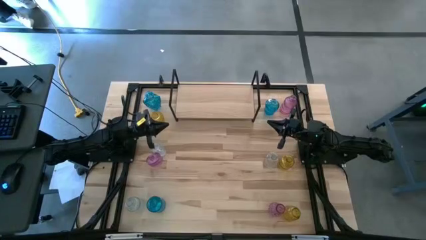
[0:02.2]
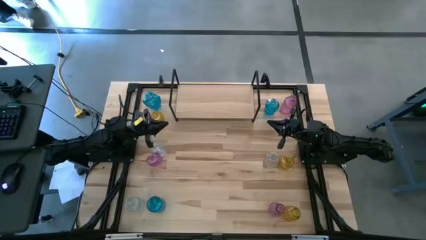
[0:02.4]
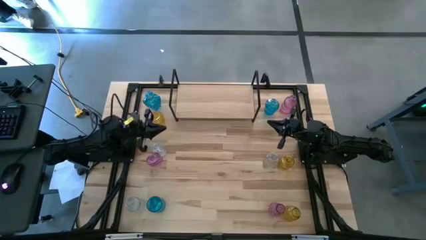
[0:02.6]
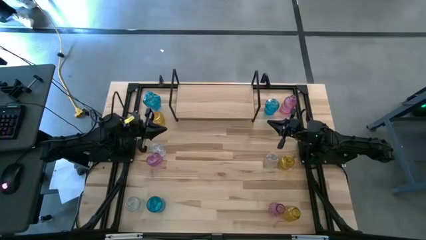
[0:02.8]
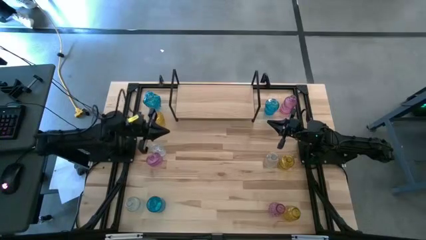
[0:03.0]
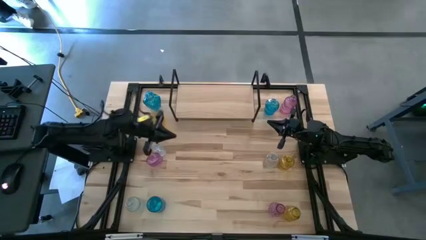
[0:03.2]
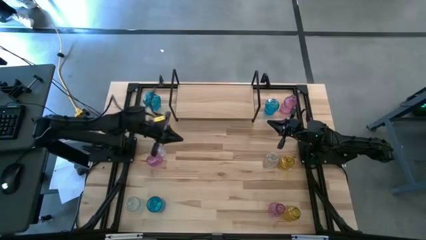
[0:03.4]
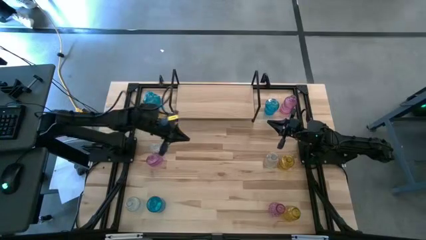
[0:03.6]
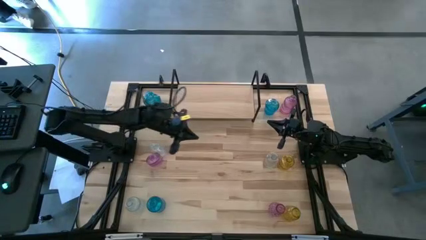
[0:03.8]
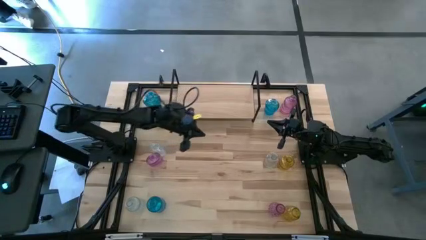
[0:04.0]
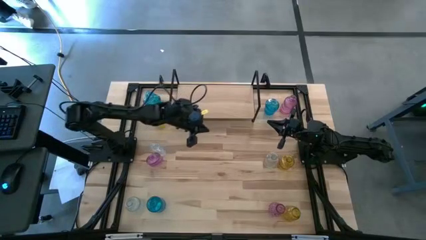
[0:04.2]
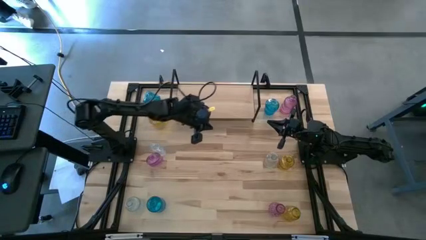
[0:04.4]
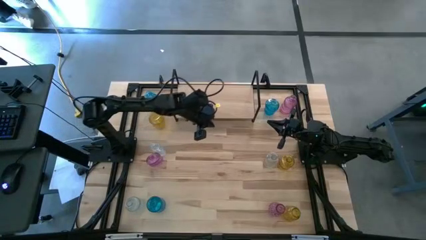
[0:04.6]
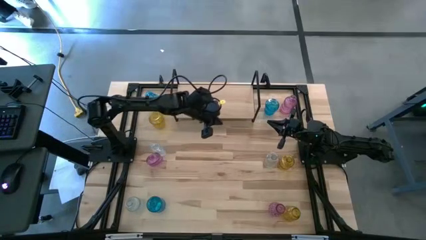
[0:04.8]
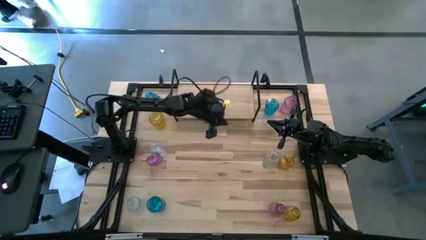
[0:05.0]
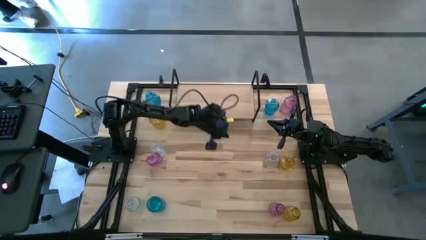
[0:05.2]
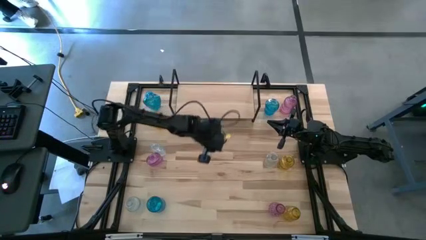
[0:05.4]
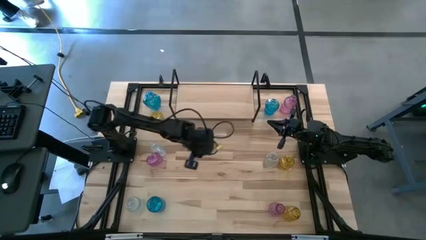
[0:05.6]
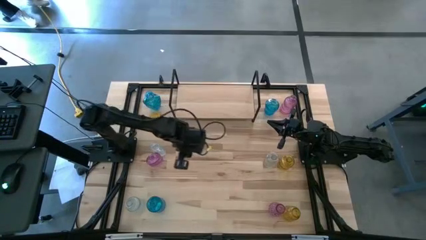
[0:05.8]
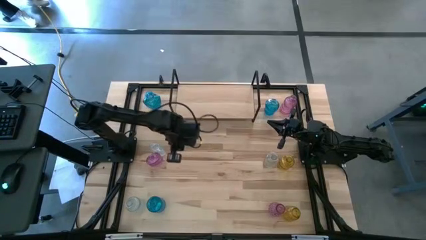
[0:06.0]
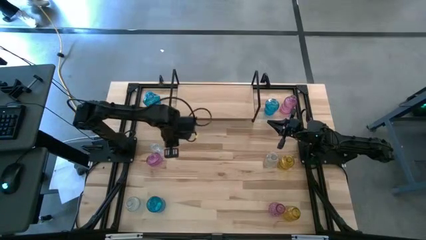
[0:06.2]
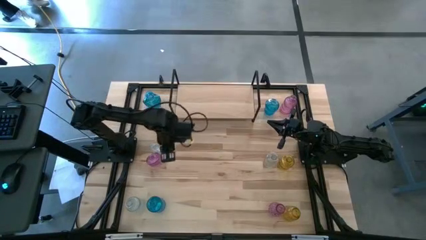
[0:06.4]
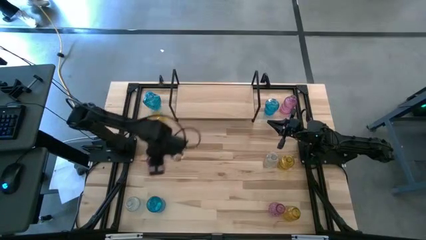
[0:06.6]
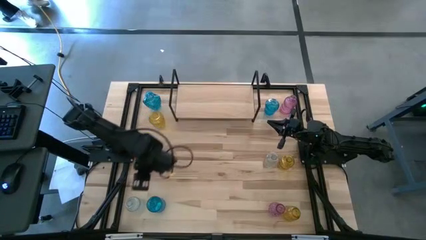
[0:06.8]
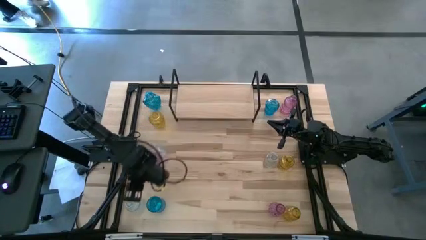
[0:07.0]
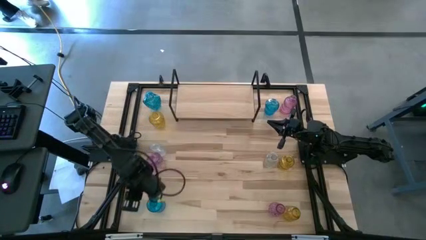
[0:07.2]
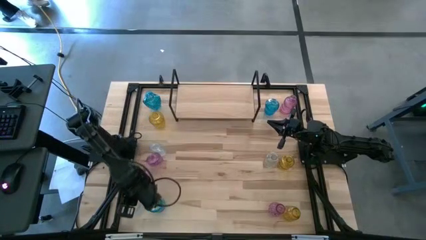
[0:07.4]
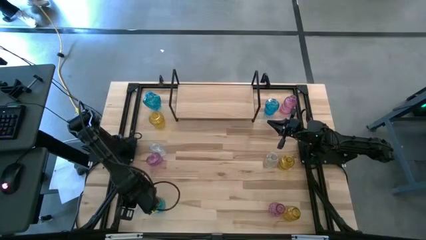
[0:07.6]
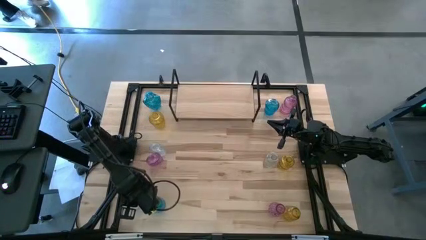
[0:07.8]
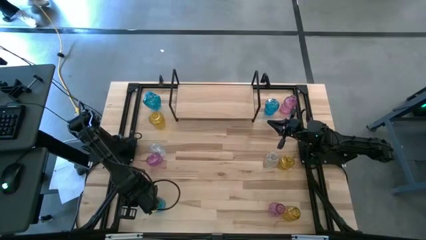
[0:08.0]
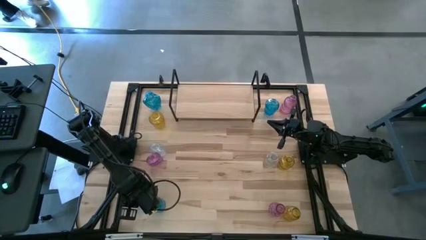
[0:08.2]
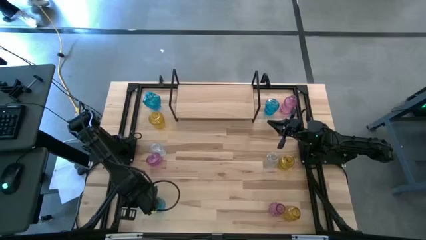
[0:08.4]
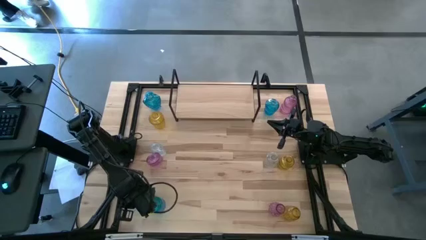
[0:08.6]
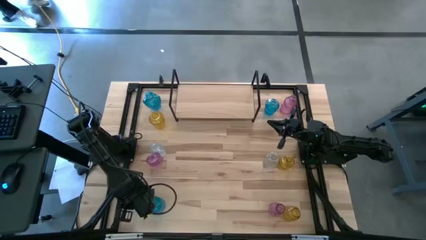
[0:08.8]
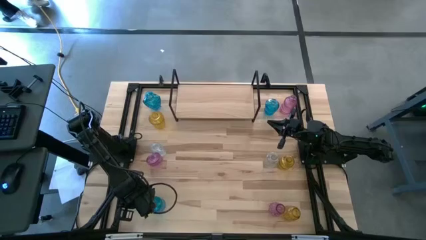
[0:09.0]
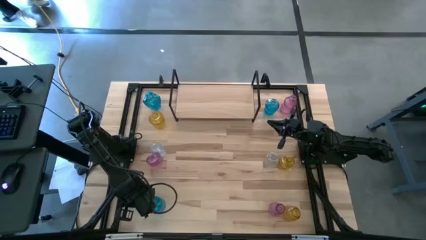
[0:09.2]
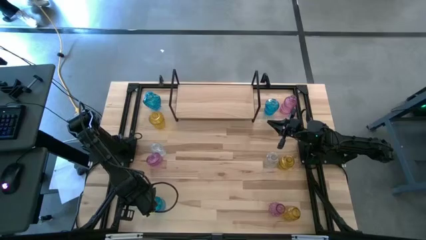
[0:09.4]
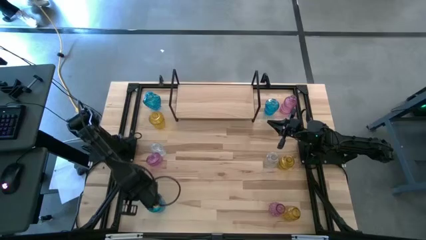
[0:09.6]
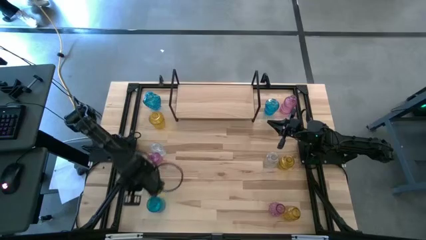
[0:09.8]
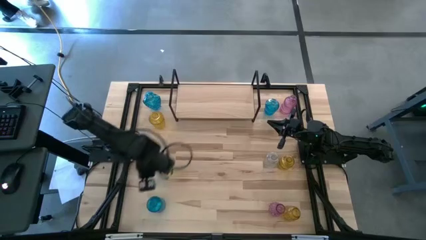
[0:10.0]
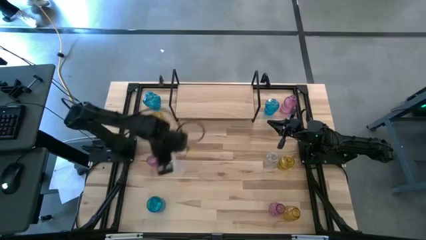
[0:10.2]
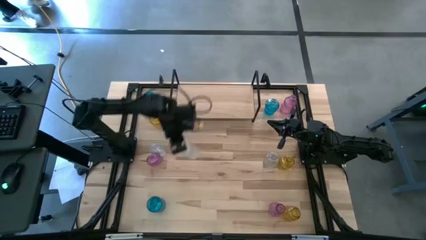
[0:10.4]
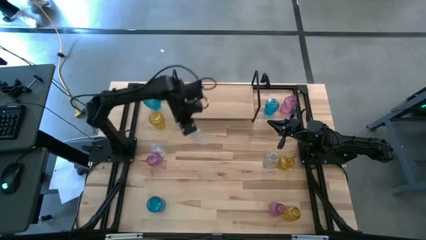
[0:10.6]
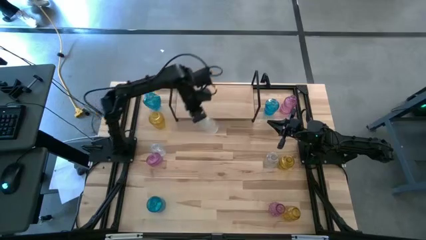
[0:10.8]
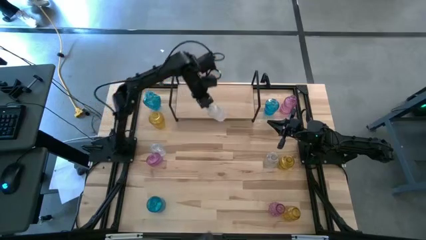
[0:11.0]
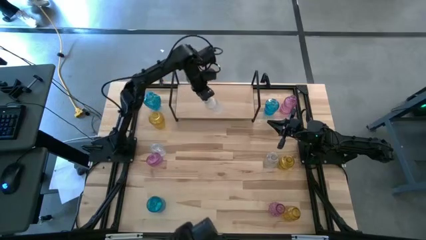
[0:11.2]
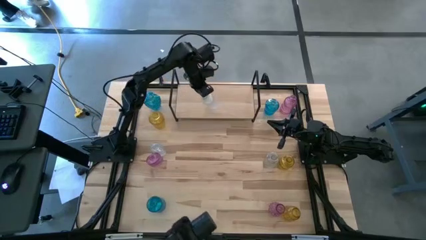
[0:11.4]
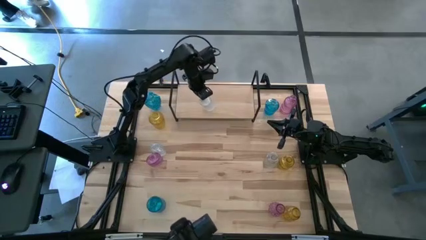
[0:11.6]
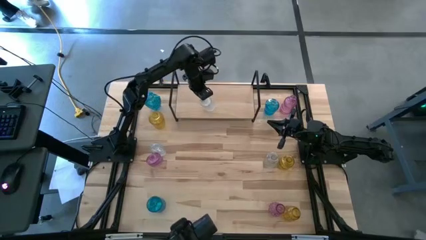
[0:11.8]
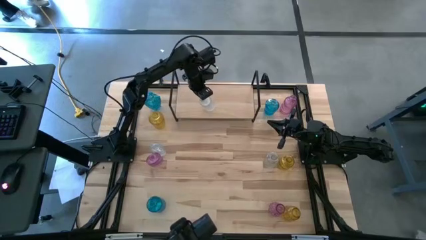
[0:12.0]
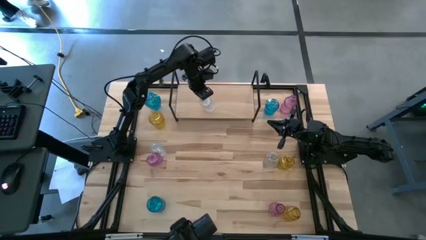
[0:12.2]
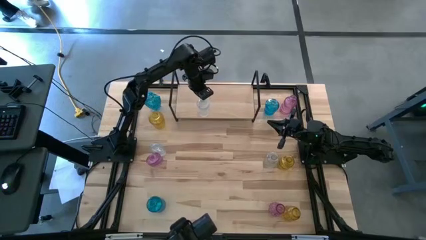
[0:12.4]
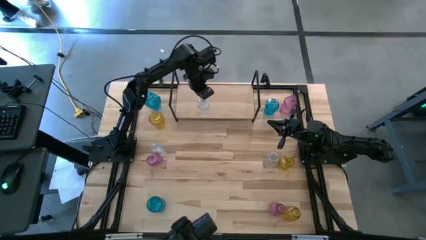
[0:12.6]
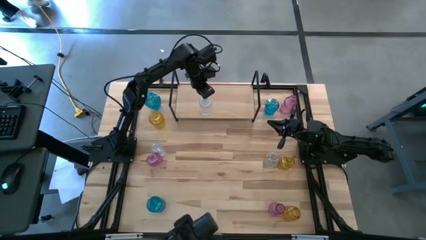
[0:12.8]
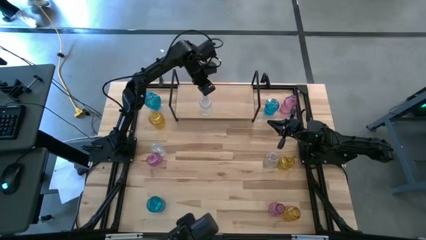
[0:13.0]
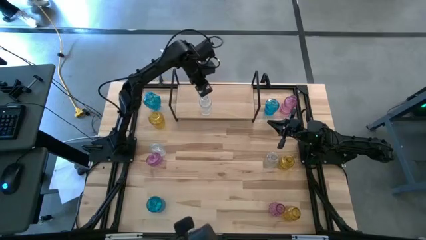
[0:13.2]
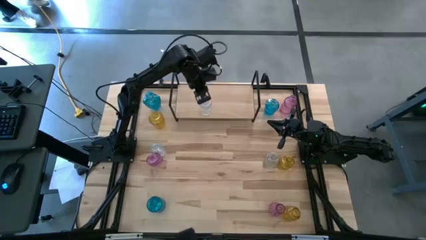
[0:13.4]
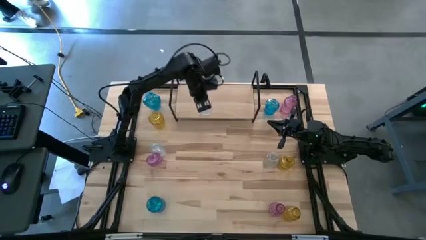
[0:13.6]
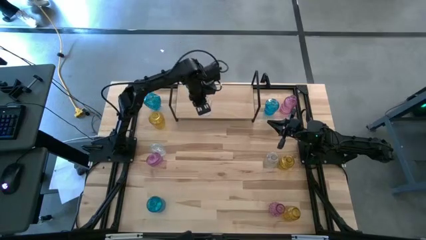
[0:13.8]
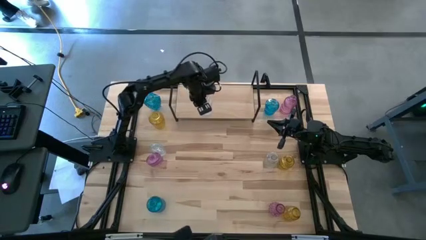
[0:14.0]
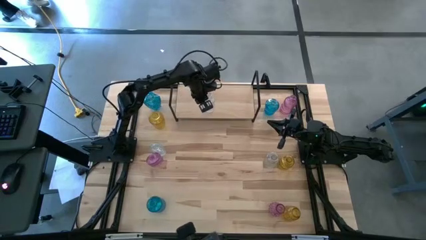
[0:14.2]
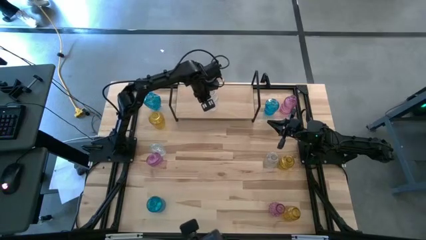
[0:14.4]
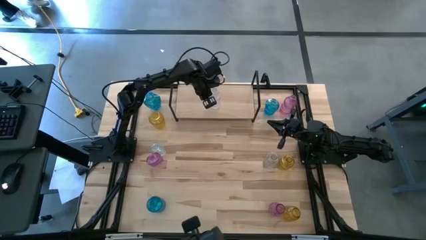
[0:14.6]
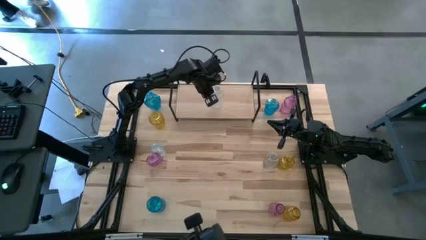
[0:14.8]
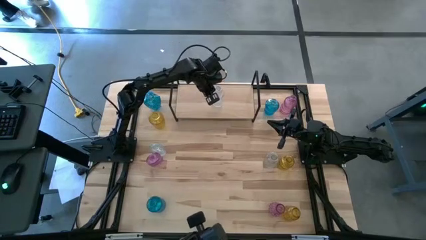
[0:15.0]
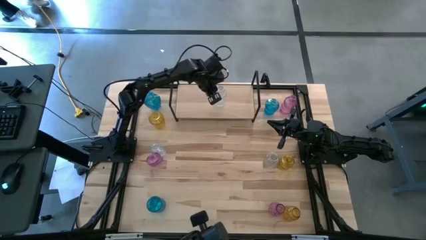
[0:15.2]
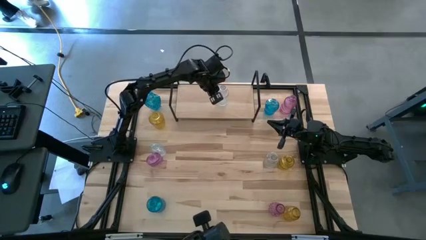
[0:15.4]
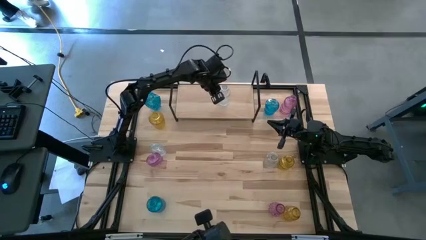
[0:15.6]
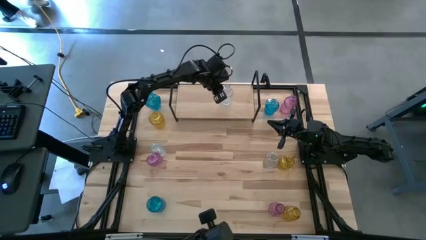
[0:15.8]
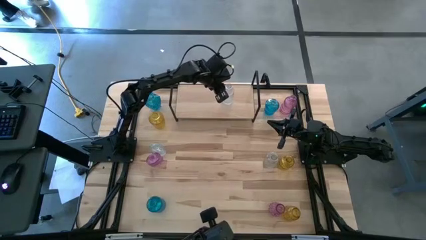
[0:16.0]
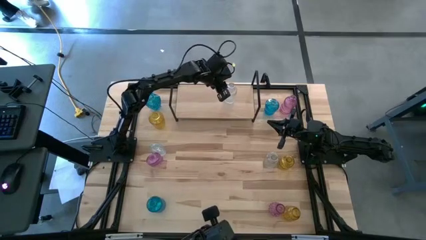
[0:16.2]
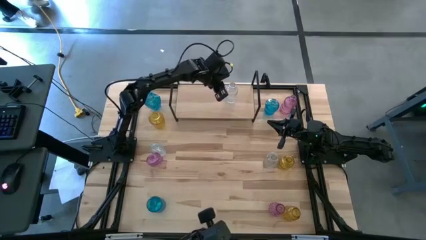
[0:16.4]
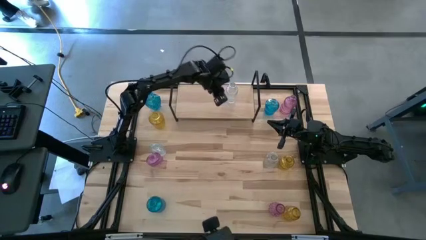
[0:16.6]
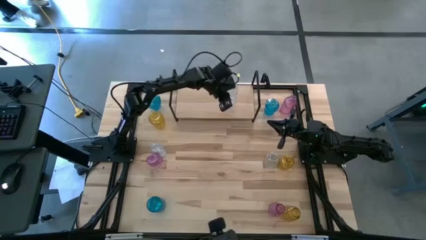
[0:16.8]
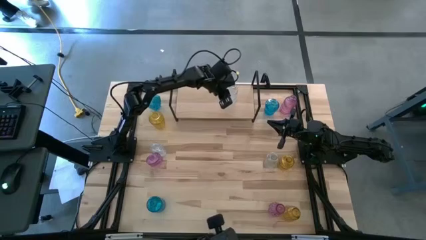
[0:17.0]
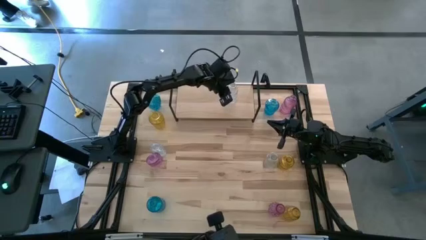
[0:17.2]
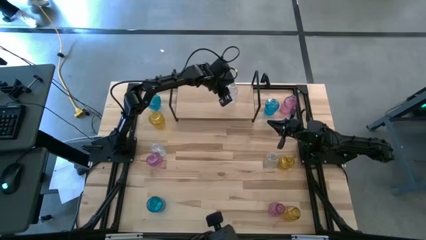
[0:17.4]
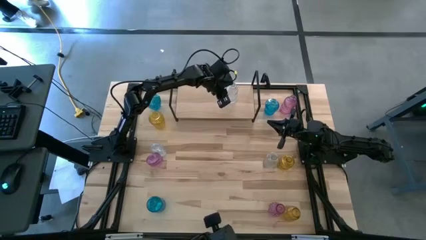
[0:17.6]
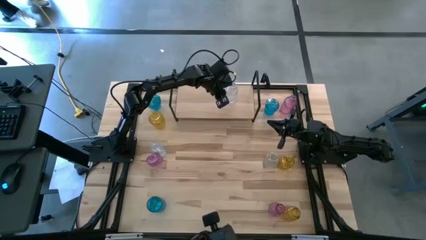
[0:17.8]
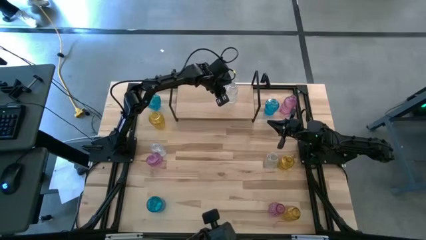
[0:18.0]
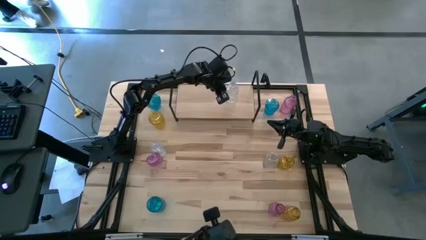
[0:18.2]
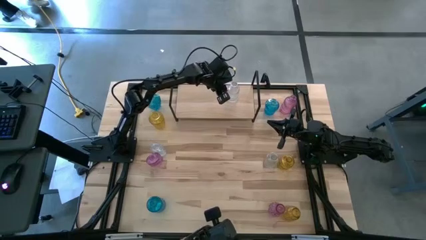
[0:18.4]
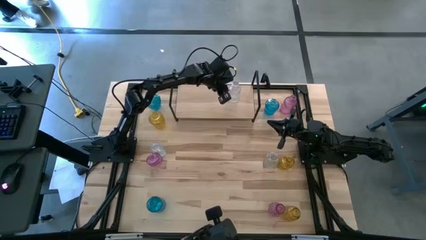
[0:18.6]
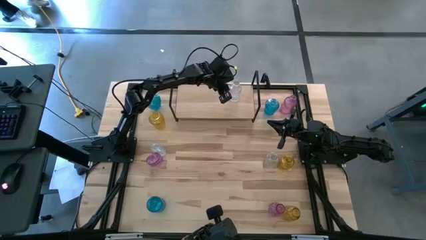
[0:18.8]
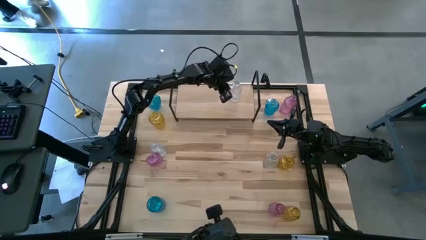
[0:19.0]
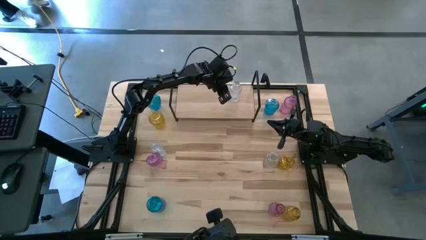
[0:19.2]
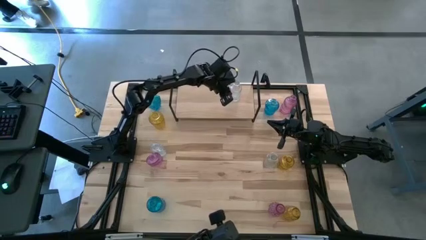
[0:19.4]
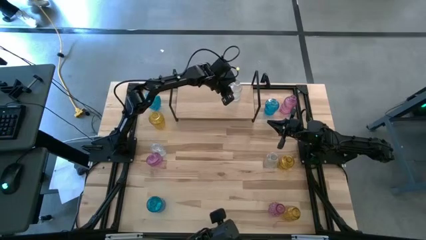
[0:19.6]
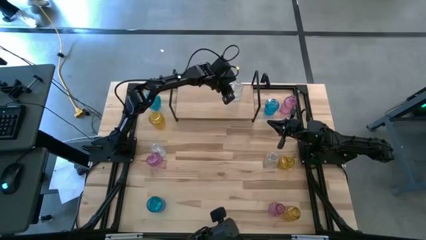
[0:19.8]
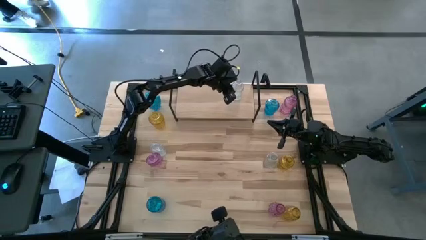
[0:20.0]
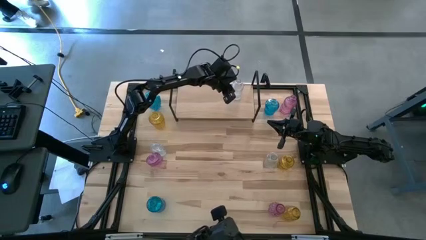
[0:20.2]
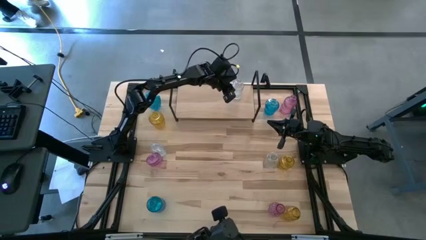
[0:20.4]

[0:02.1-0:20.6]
Task: sort vases onto shelf
Put the bottom transparent vase on the shelf
